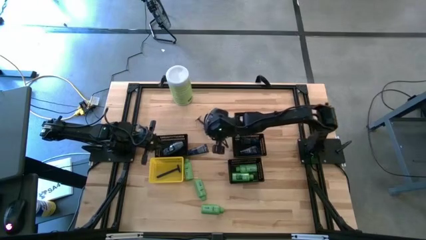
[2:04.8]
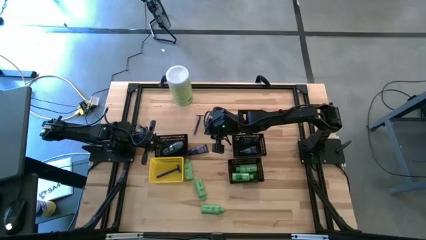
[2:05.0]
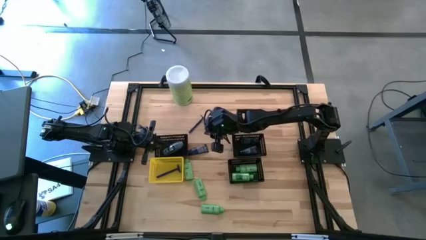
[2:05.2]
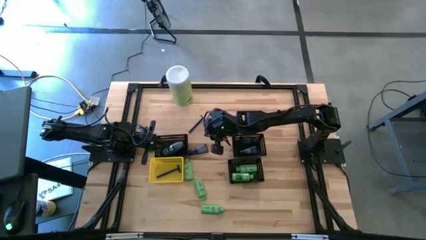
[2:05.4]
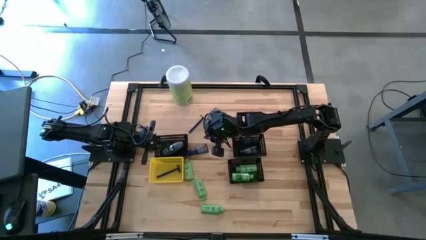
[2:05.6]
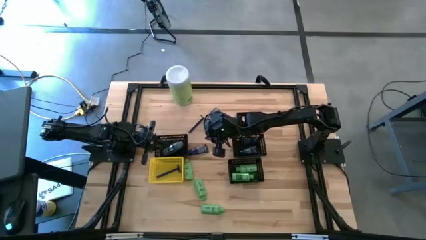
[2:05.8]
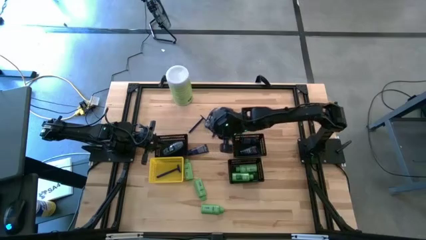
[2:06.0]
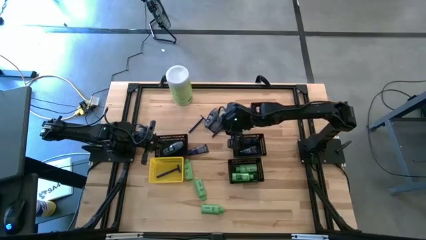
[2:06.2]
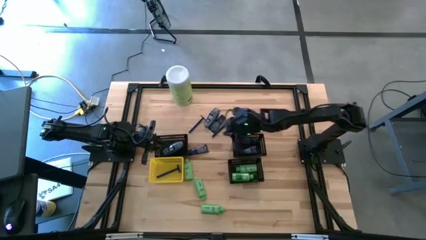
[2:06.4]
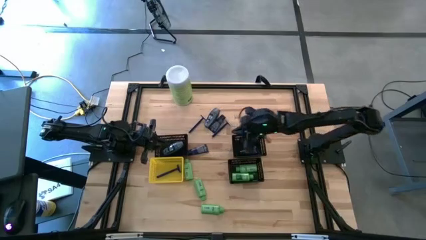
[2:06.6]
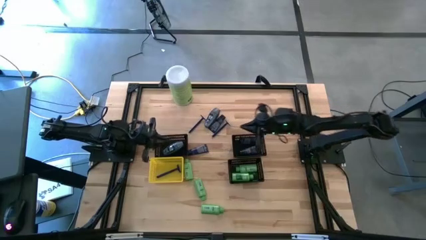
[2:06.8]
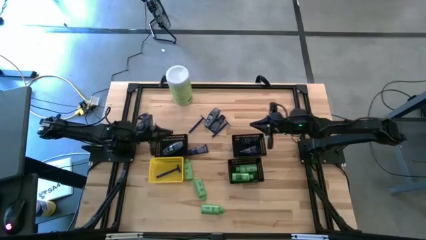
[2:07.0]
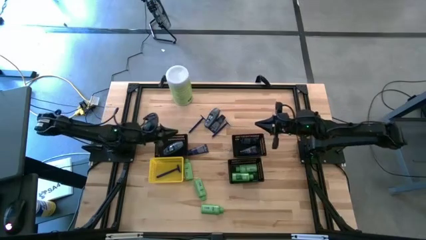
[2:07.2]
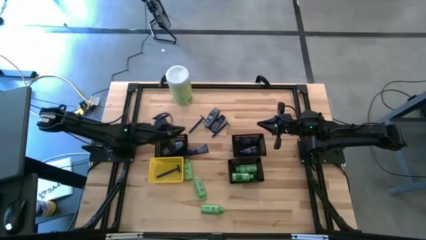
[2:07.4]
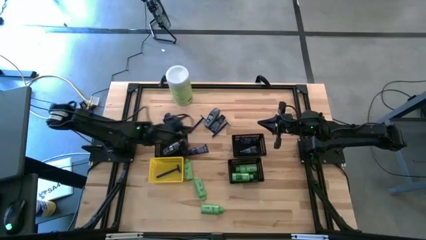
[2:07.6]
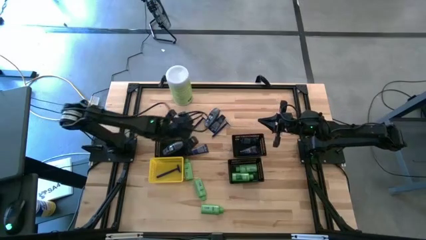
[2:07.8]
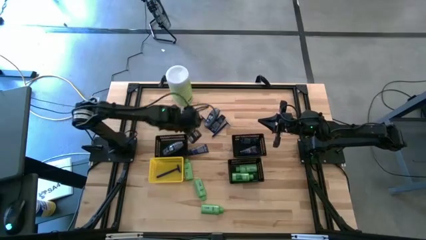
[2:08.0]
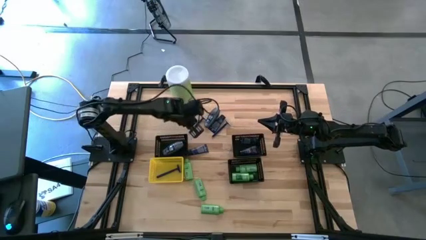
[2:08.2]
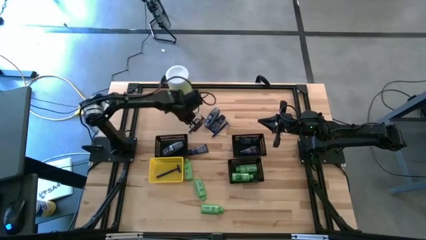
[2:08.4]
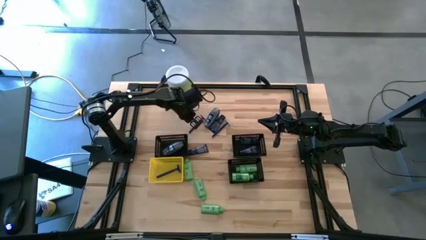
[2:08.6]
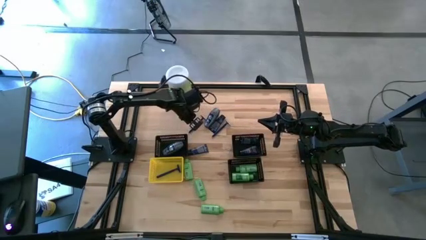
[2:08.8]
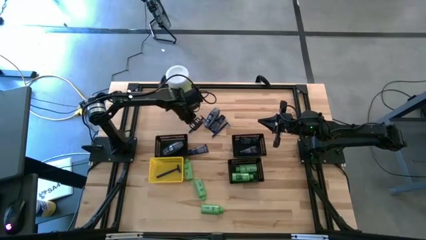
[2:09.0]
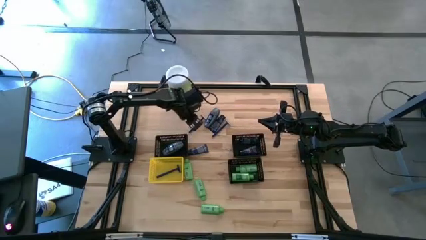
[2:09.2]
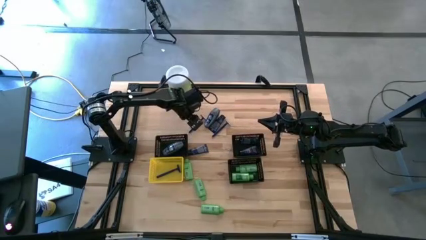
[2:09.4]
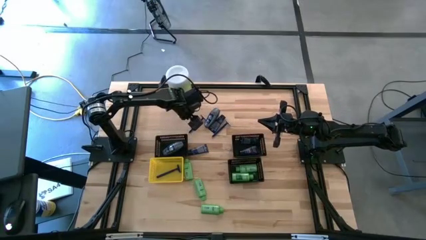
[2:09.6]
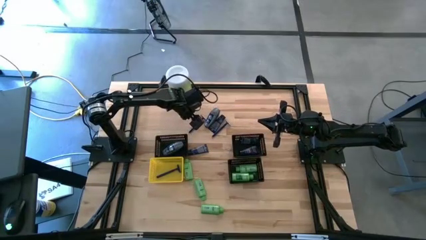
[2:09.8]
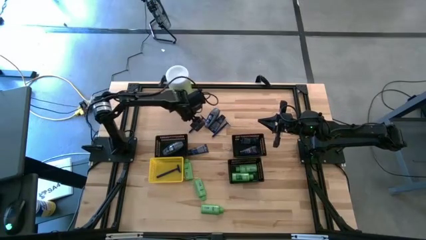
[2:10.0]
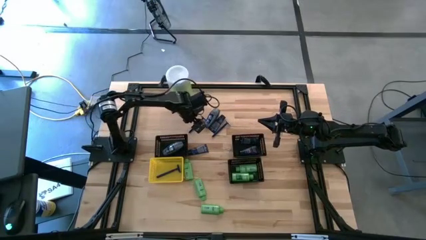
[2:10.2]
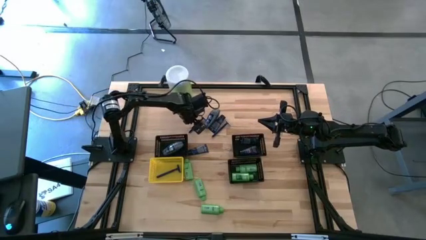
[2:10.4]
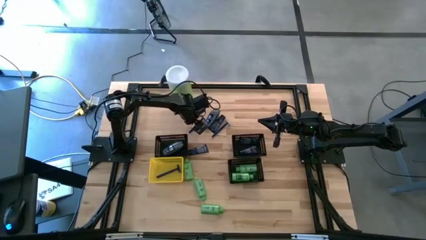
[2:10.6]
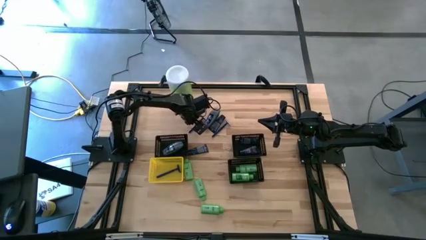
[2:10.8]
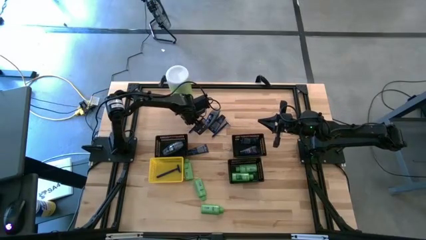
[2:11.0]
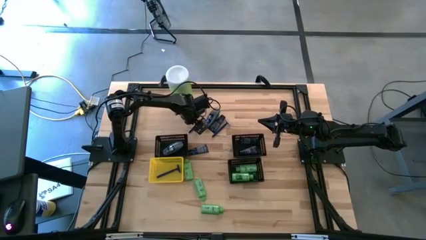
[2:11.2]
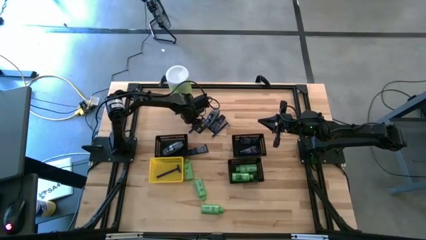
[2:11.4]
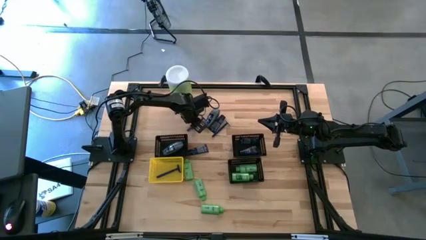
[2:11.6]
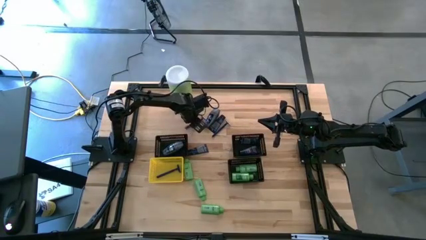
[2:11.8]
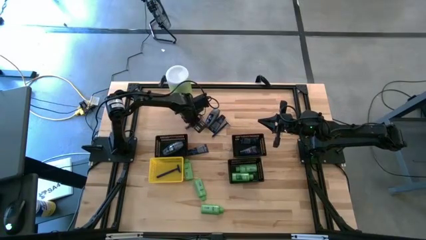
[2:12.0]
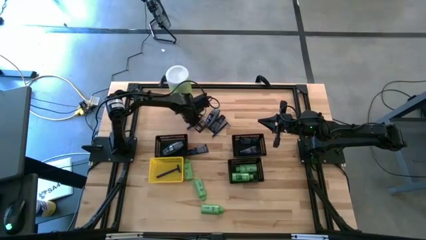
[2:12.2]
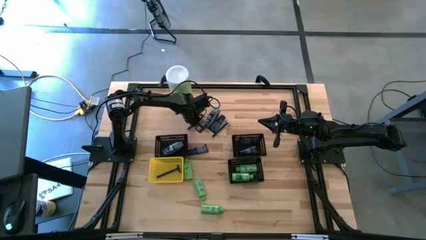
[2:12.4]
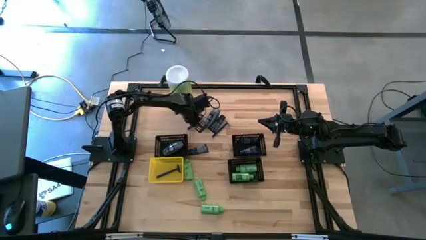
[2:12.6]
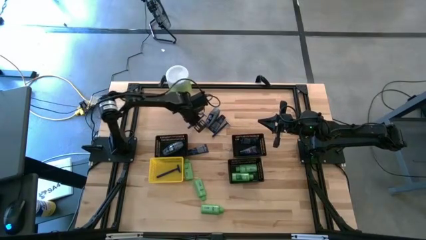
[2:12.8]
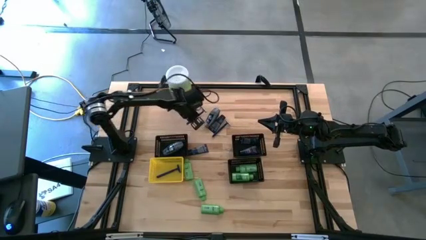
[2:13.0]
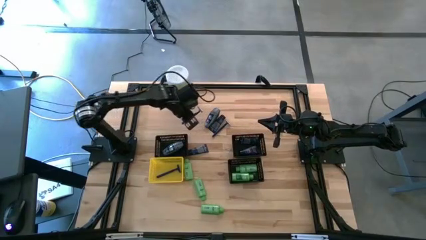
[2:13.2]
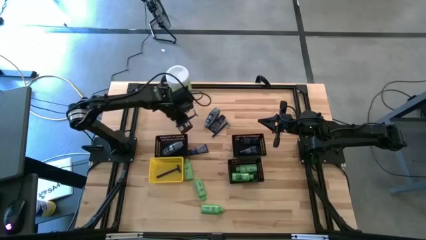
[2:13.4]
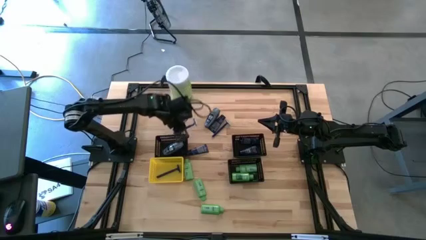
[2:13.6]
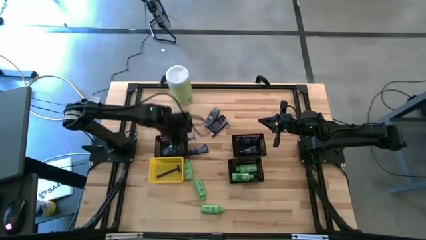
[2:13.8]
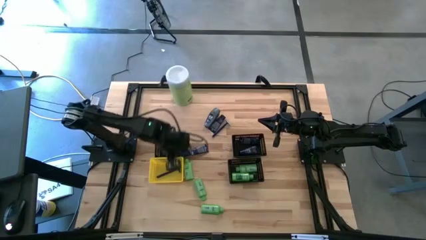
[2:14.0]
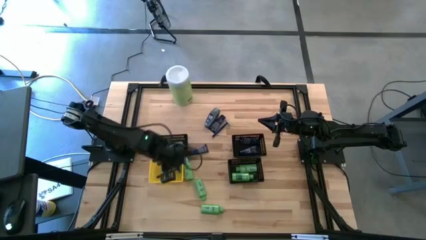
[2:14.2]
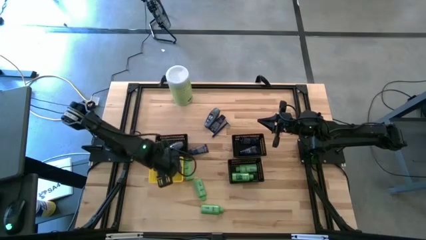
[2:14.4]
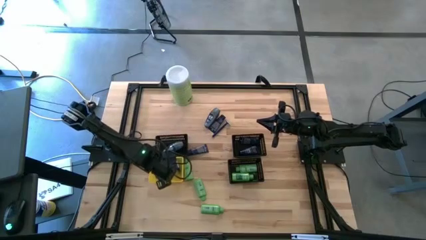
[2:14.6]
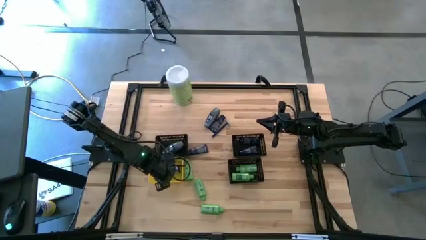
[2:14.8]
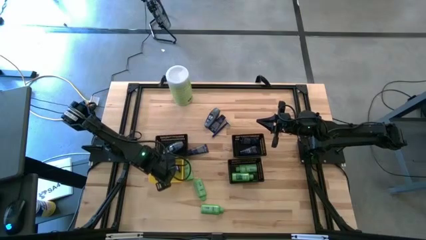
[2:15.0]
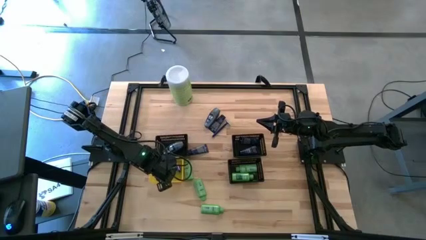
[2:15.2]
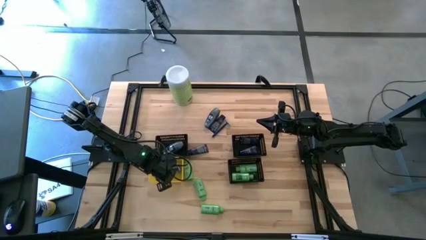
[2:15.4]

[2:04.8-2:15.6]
Task: Pick & Place Travel size toiletries
Put the bottom blue razor into the yellow bin
